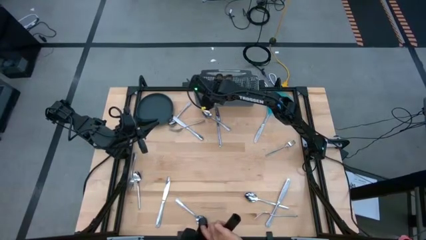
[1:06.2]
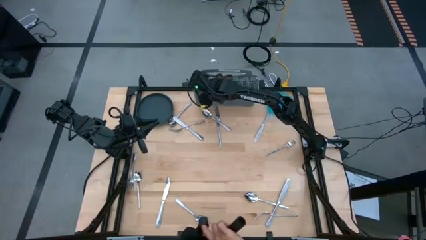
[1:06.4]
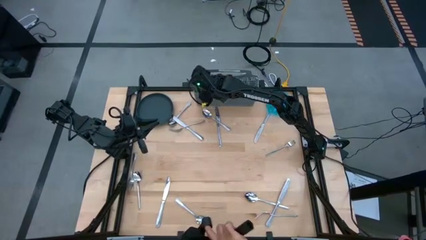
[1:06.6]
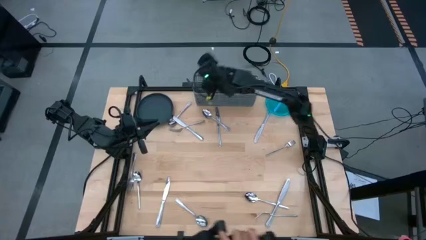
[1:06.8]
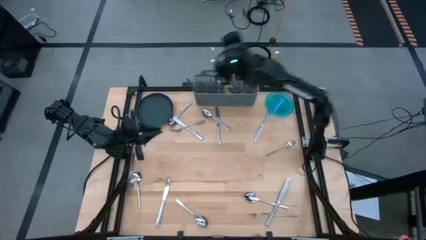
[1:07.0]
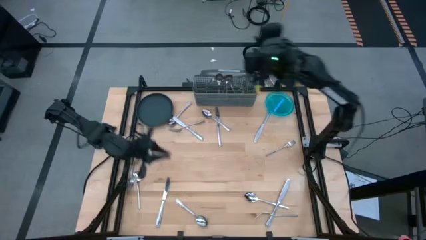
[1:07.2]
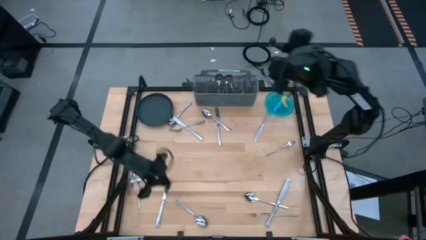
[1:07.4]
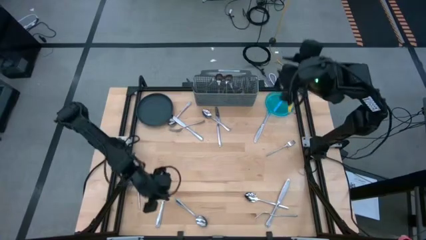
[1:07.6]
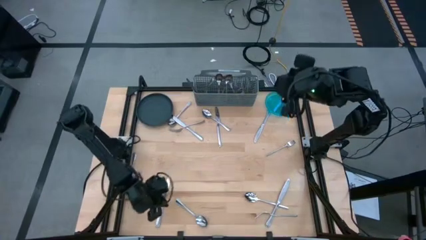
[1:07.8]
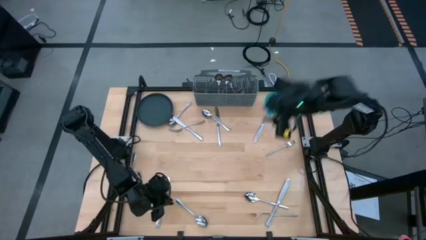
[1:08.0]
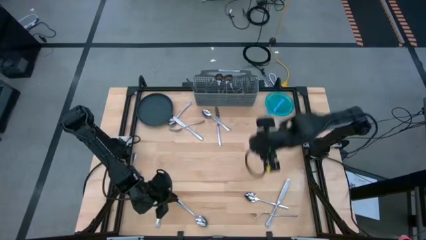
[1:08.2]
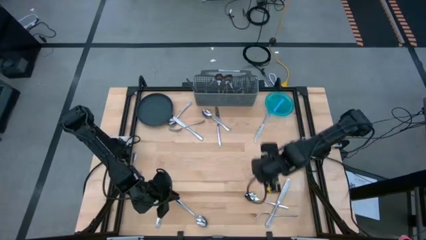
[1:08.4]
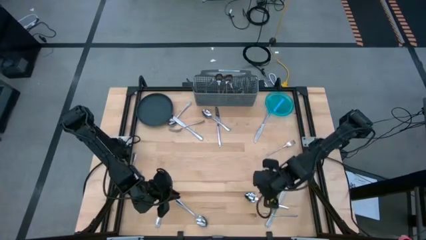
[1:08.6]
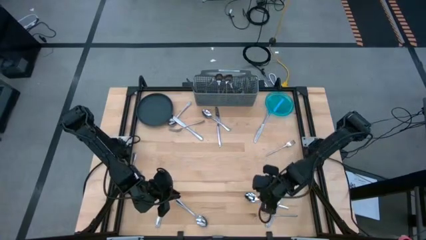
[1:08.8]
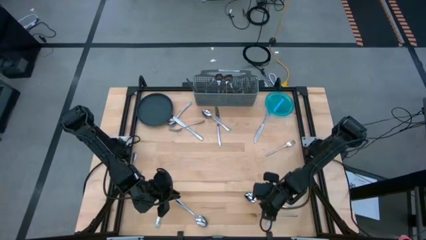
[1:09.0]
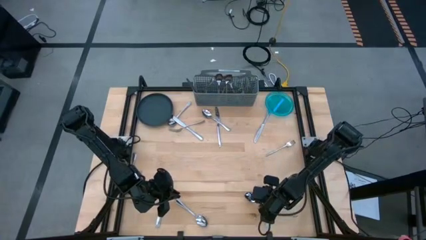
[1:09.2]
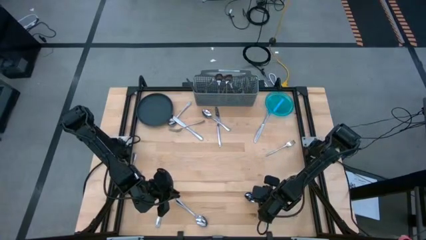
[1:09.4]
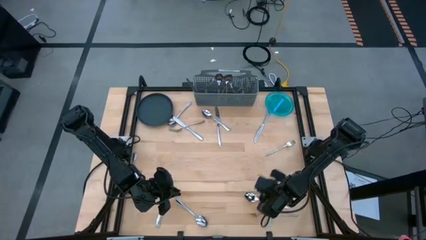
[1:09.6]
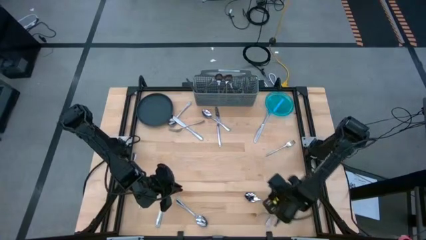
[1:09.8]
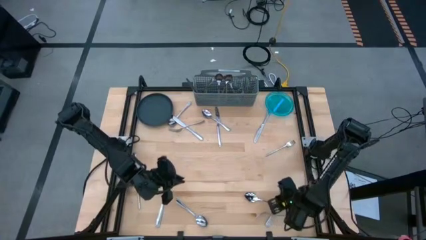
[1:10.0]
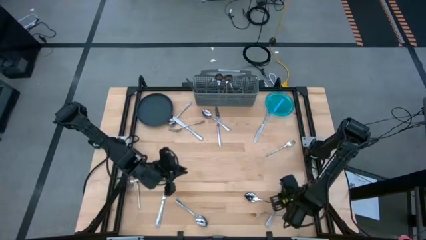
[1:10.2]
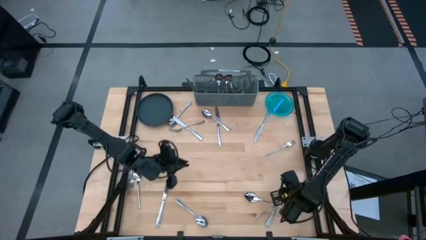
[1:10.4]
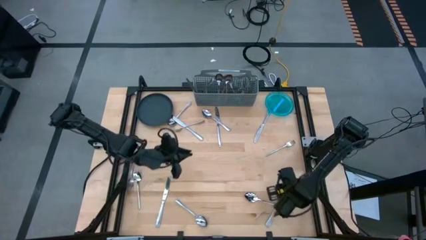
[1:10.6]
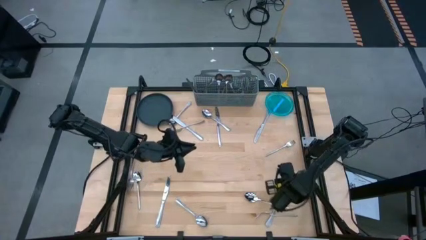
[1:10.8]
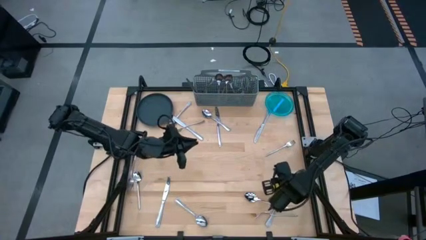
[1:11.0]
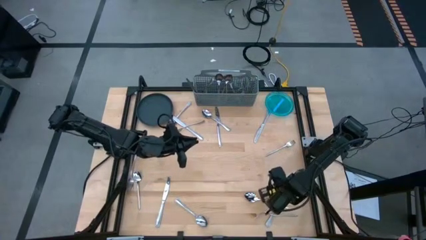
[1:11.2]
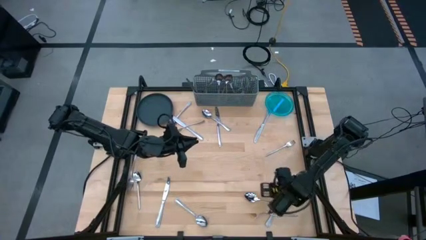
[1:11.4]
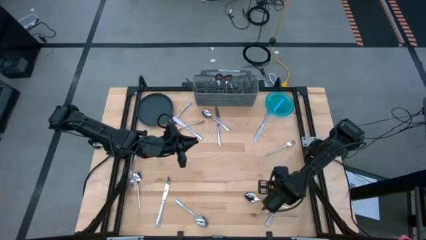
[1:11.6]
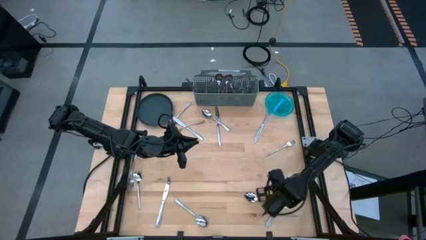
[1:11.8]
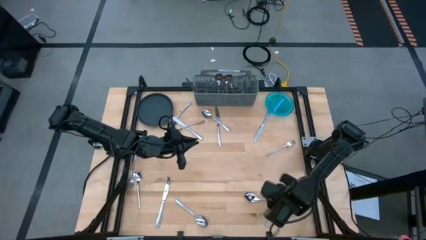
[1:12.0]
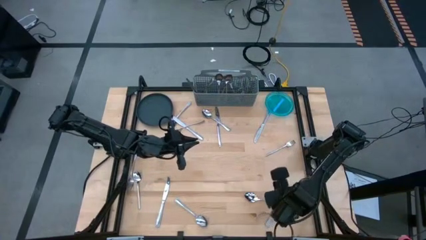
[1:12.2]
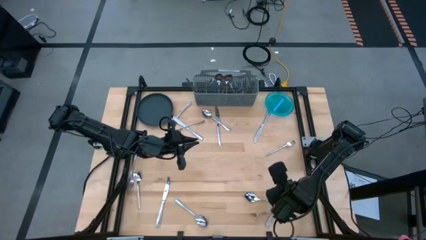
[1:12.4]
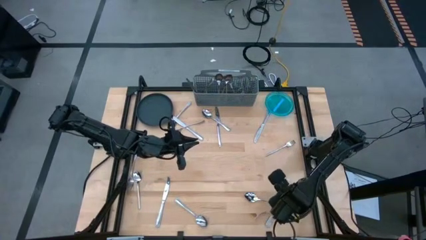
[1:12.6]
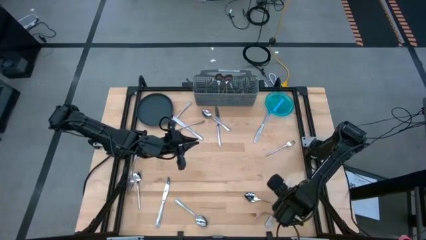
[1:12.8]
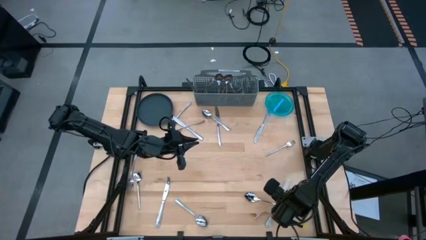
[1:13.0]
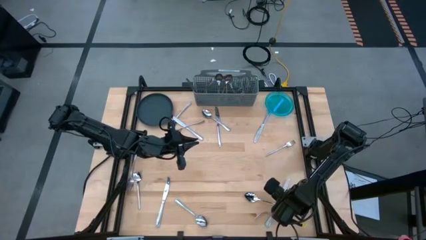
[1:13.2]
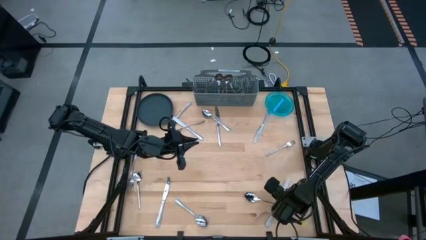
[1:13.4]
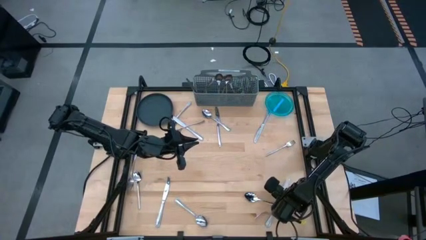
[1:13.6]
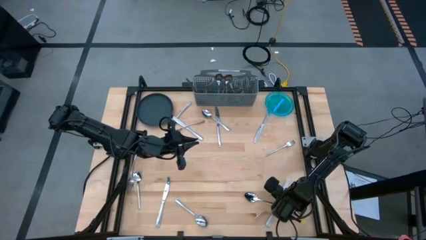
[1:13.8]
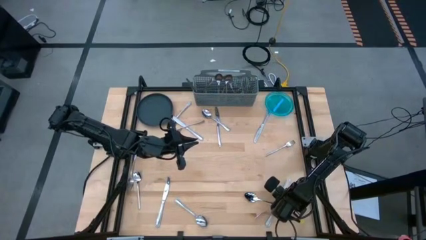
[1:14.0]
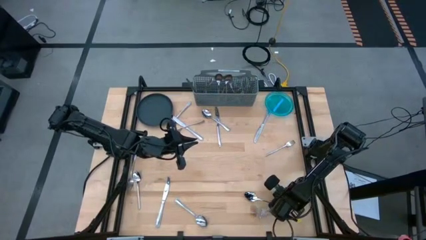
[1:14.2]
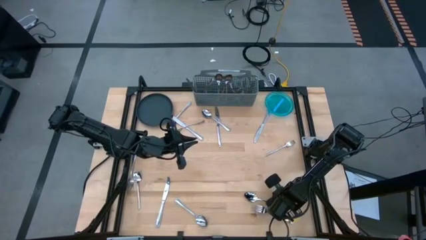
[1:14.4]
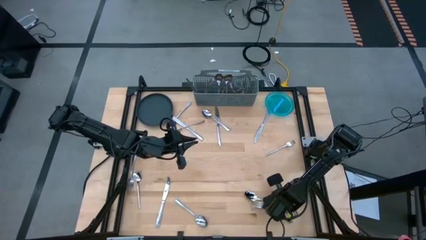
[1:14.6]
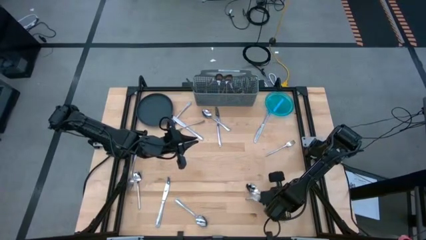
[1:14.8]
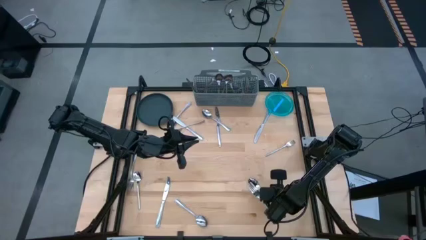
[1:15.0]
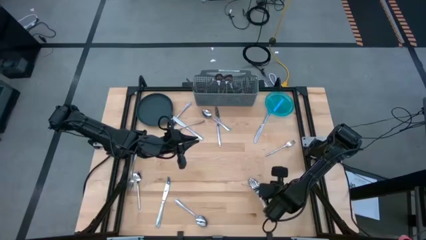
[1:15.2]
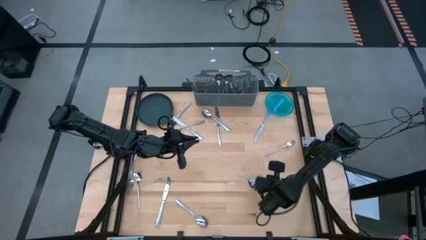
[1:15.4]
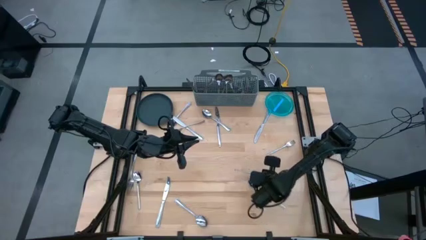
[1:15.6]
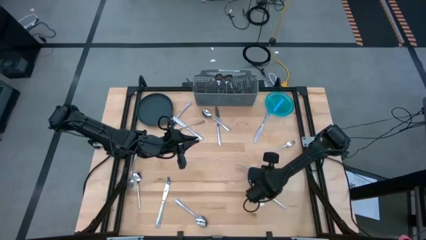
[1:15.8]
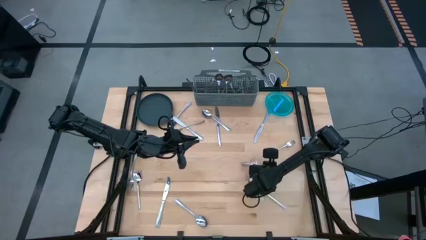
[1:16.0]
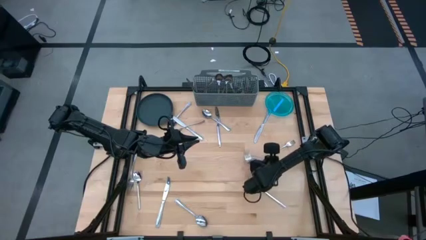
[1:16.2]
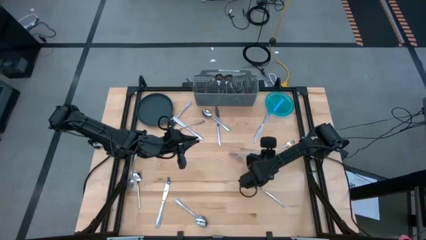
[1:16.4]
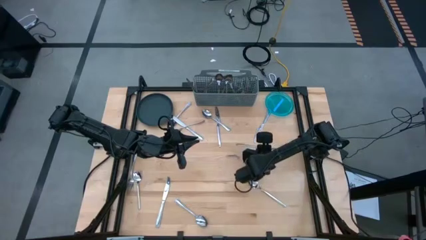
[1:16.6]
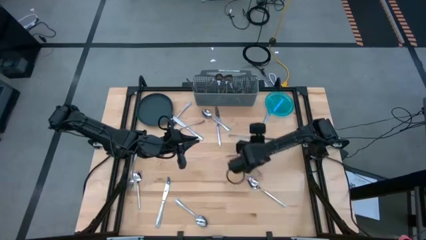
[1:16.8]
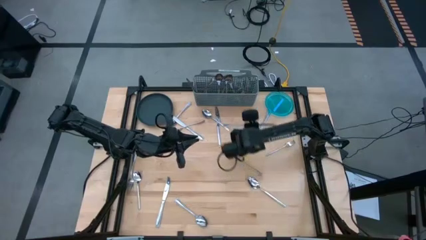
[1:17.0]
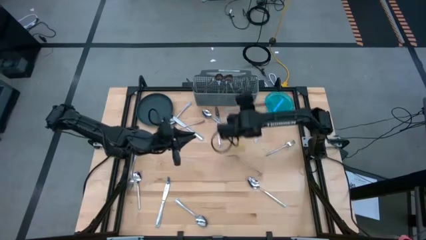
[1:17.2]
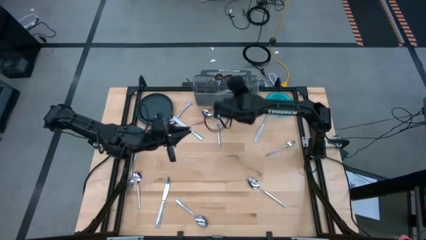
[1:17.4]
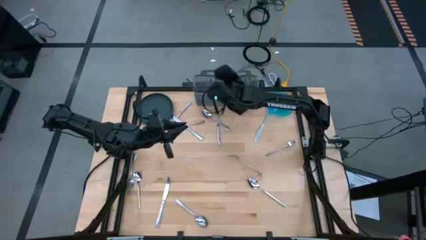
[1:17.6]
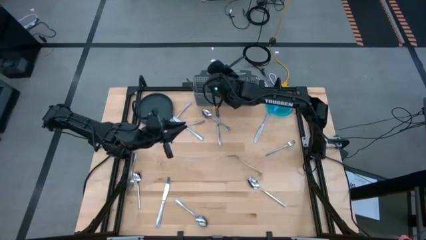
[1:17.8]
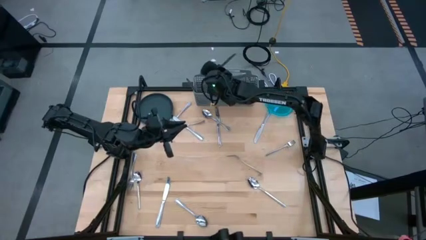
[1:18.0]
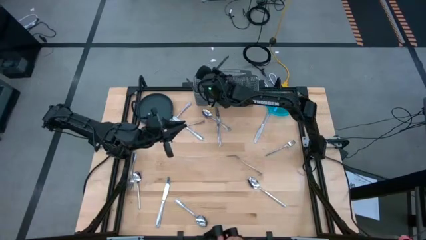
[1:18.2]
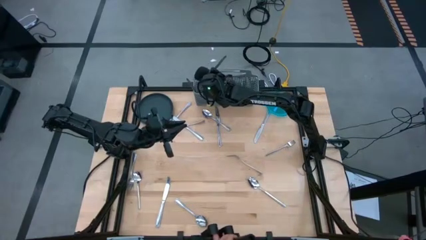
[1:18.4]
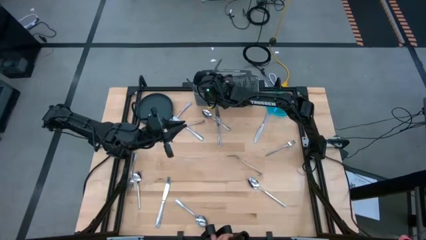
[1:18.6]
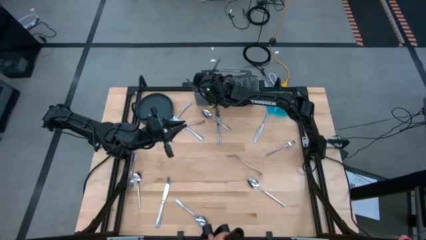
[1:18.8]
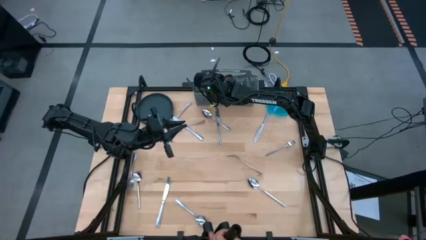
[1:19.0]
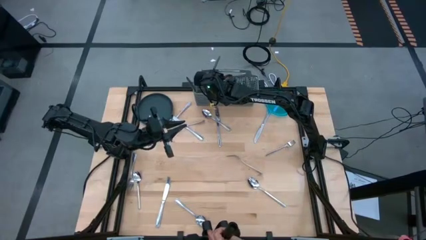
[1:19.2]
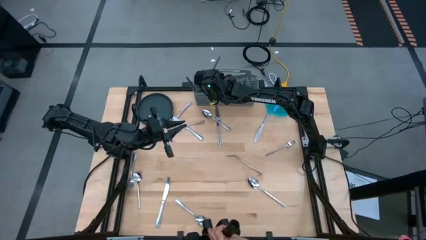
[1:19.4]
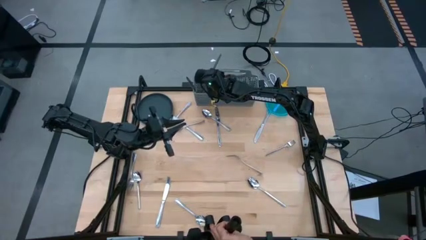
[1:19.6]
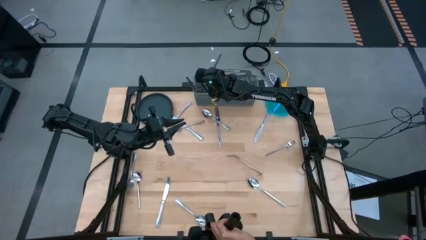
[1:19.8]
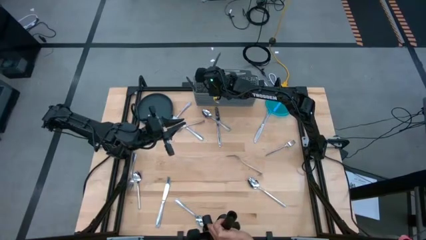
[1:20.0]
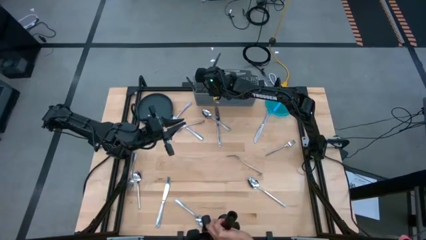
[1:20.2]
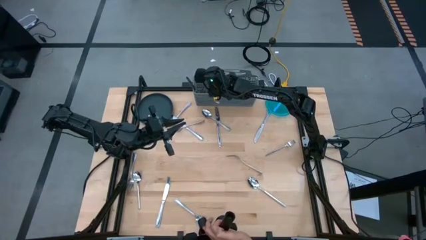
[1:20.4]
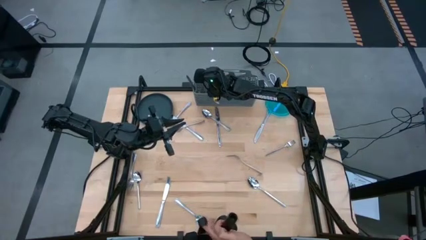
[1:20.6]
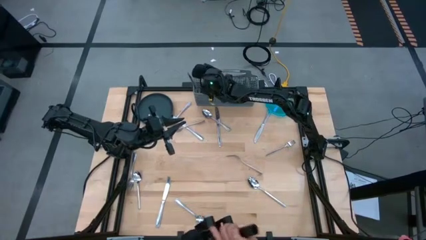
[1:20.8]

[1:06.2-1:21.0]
Task: Sort silverware
Put the knife into the silverware basket
